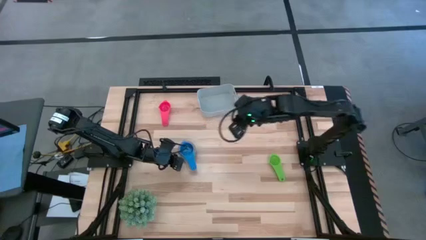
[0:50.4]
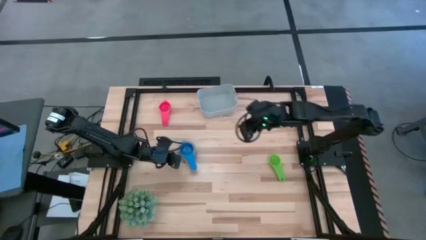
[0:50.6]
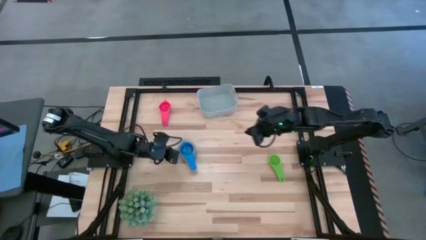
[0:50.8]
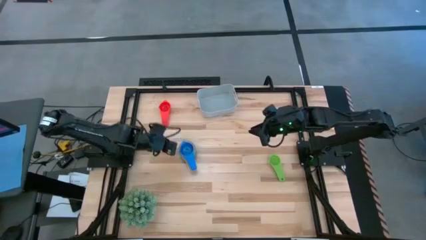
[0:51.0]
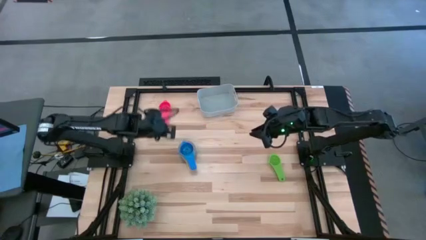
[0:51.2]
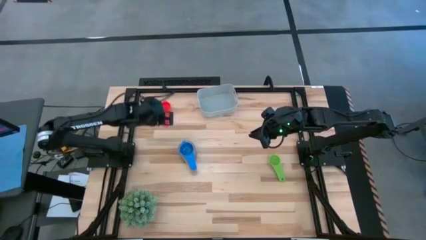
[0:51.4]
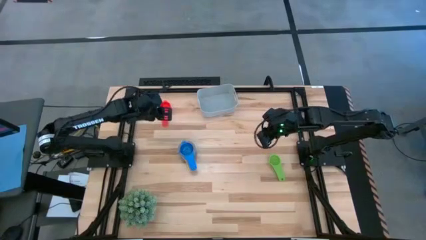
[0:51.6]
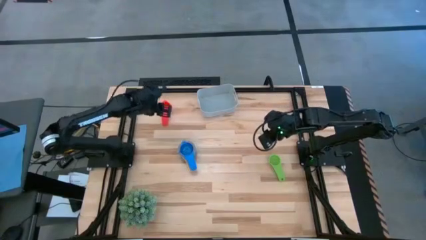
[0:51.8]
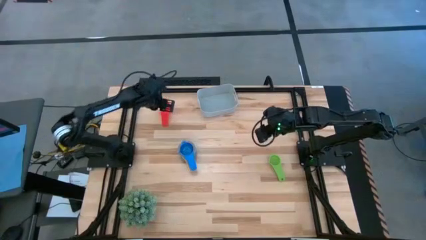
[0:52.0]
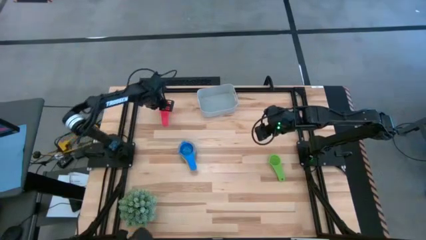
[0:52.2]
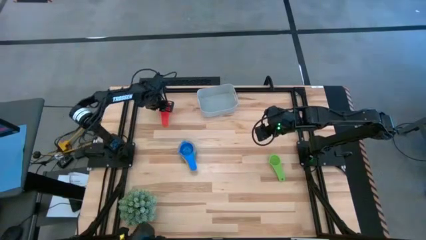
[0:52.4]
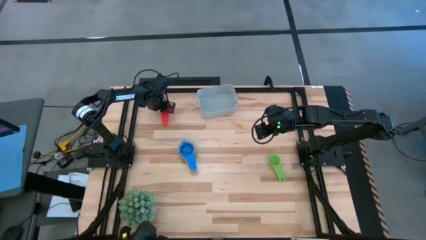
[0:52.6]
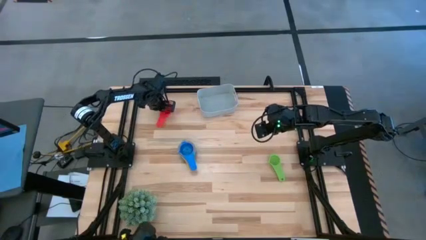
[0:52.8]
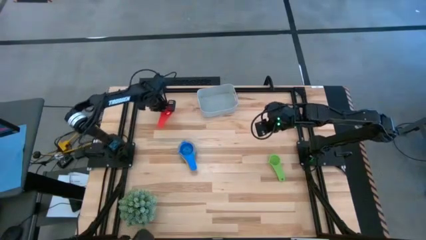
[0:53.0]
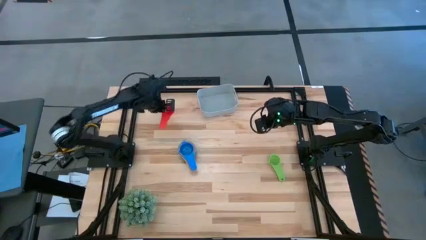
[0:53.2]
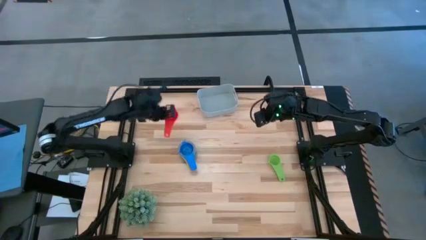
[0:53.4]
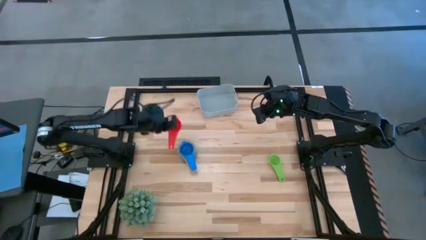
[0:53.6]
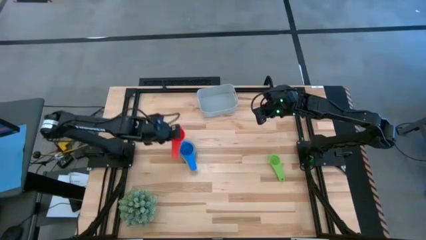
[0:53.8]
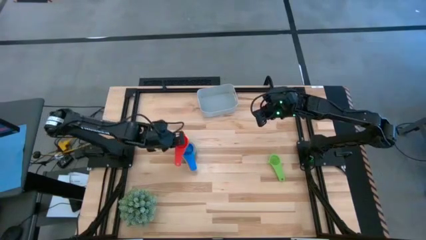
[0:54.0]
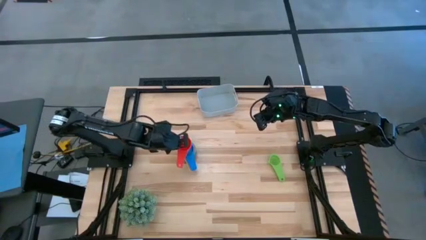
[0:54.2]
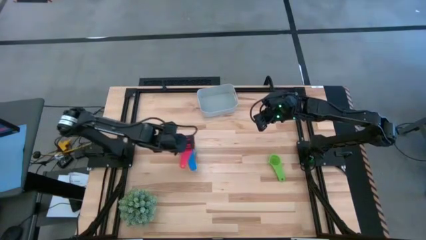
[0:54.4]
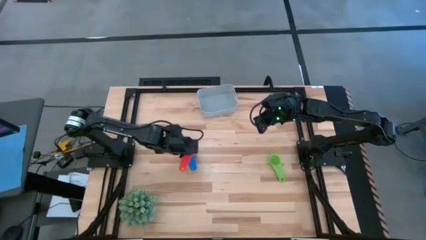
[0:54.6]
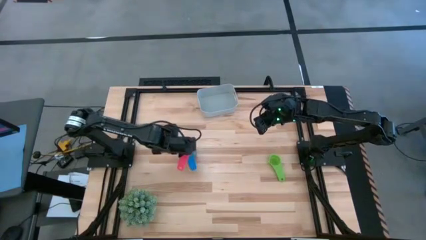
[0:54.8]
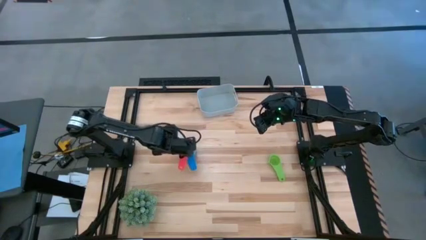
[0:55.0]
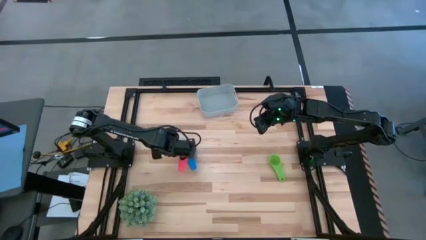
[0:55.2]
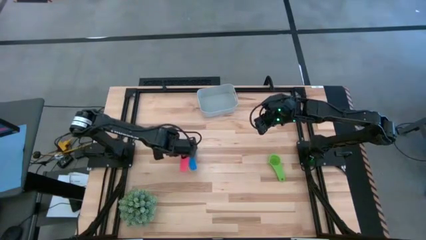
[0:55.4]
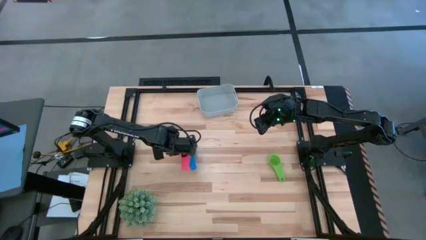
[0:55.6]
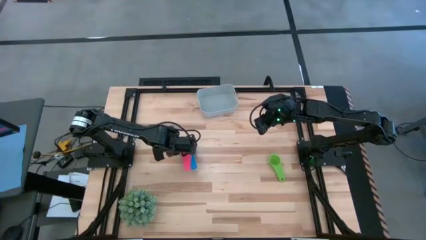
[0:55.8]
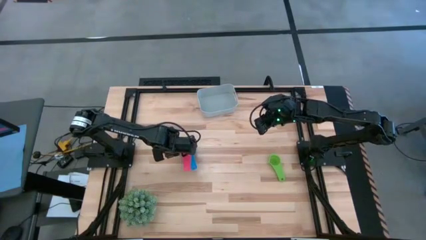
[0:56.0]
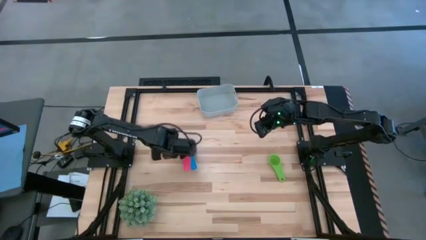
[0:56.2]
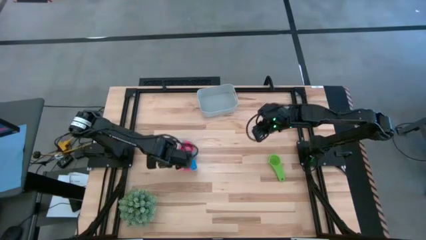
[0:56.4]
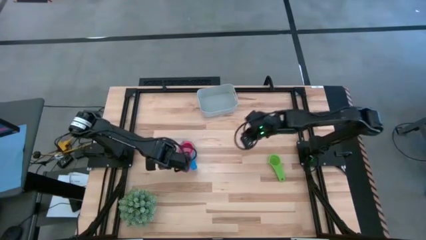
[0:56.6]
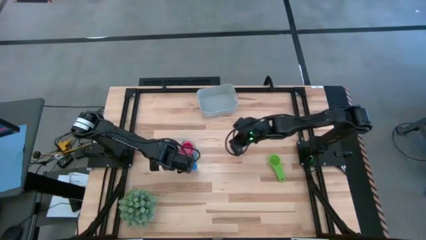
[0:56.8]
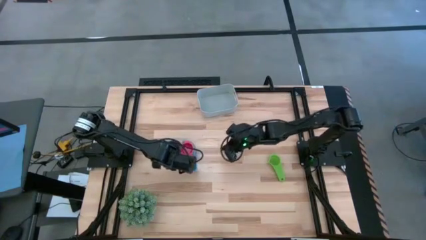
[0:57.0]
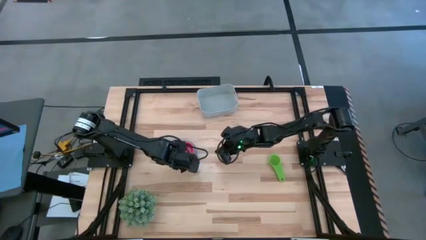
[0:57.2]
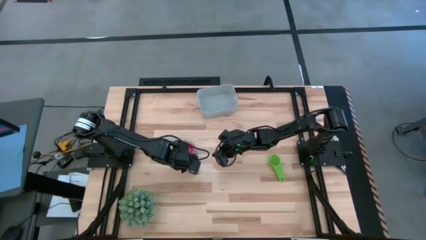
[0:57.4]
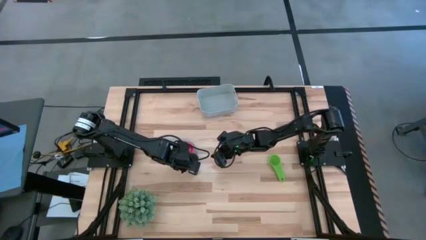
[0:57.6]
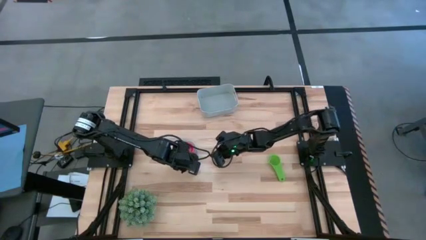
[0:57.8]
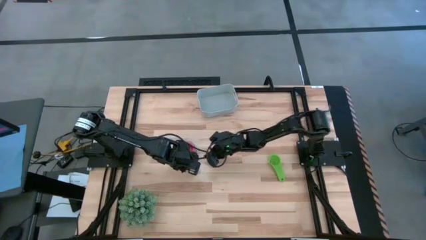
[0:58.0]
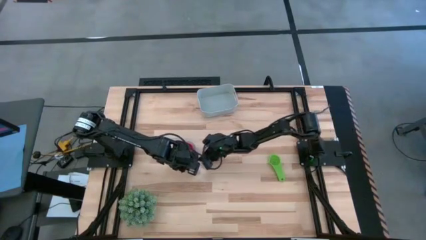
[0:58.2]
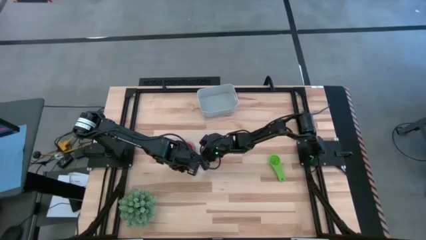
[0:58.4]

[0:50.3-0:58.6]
Task: Nest measuring cups in basket
Stack the pink measuring cup on the blue measuring cup

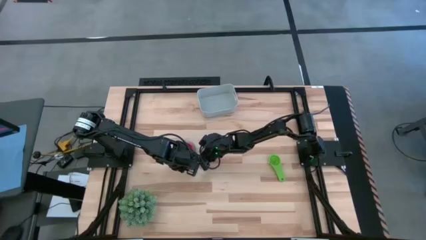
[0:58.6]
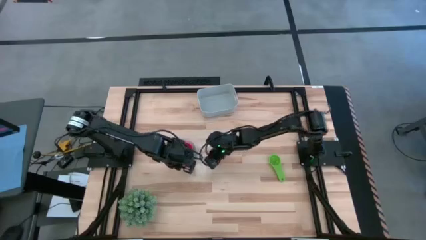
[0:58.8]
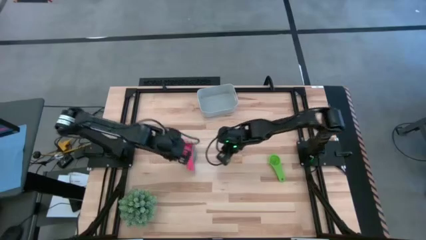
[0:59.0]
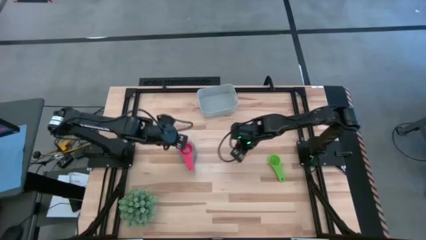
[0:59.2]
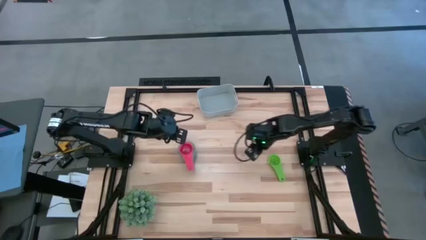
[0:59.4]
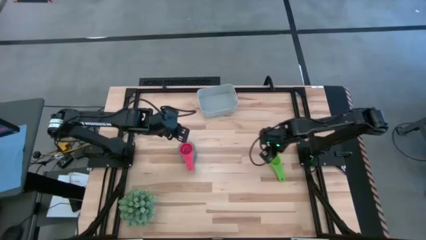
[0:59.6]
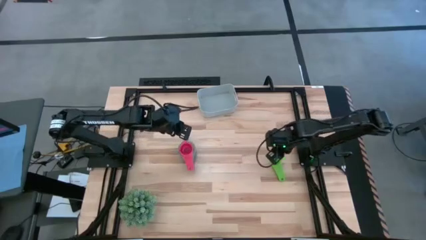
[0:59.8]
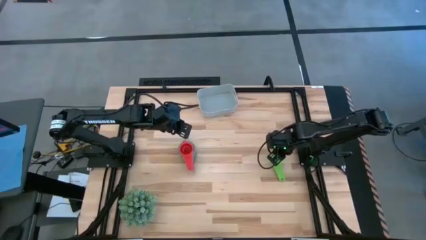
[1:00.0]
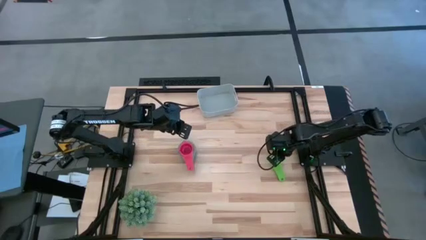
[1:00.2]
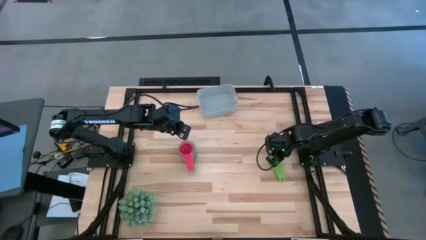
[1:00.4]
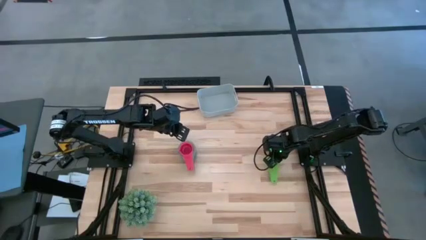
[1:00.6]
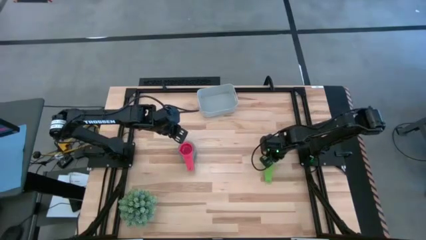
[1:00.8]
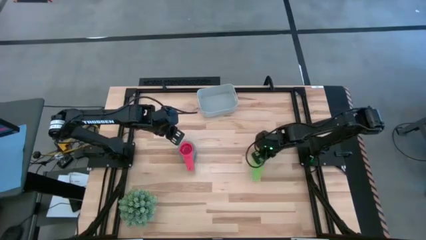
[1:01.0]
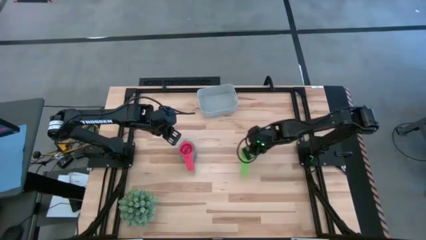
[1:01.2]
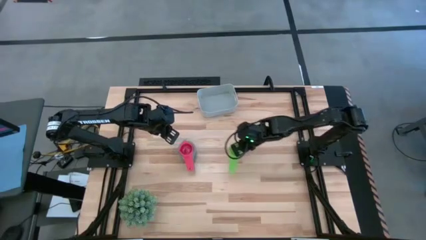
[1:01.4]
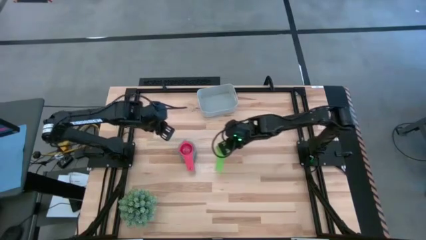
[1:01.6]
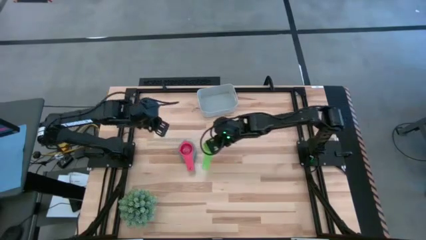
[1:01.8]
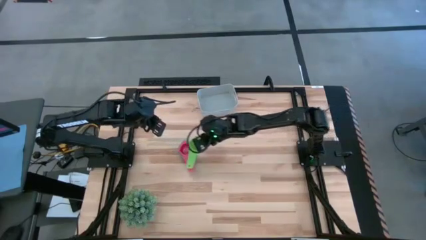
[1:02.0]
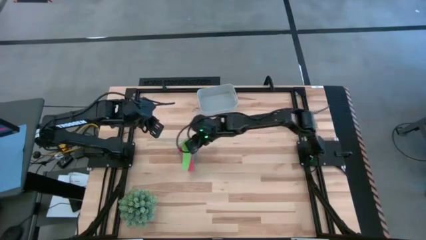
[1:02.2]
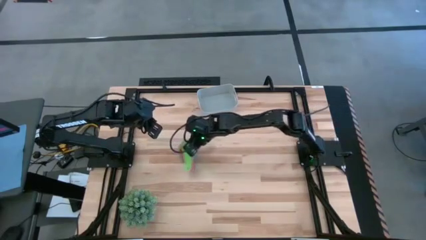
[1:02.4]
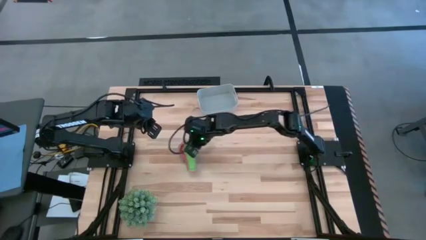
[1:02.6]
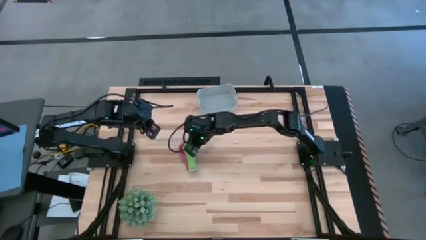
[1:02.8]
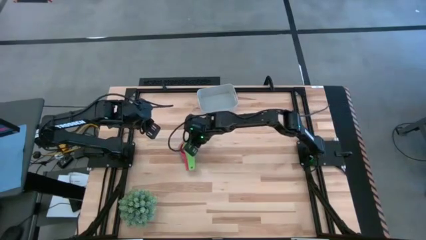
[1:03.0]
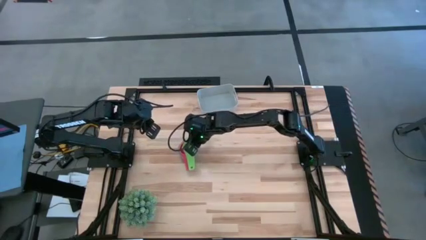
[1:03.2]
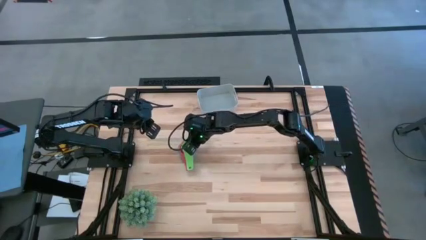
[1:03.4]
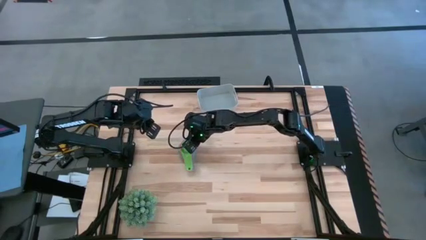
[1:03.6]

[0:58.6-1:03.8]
Stack the green measuring cup on the pink measuring cup

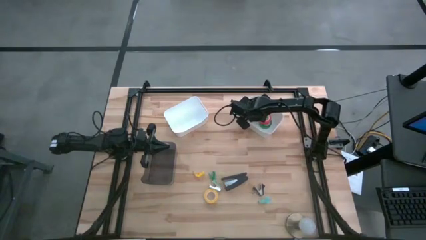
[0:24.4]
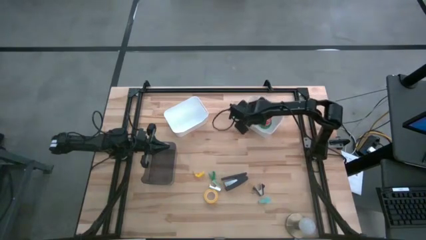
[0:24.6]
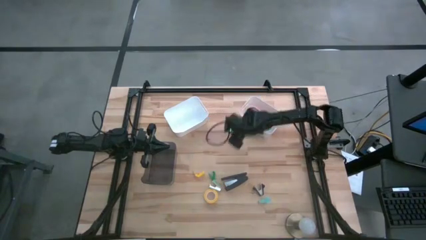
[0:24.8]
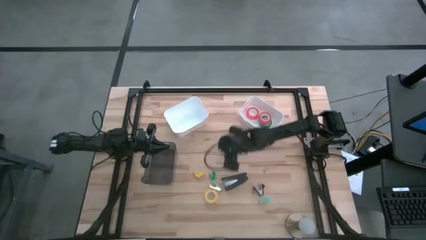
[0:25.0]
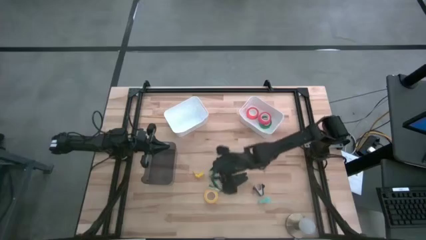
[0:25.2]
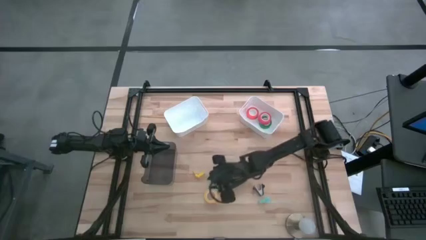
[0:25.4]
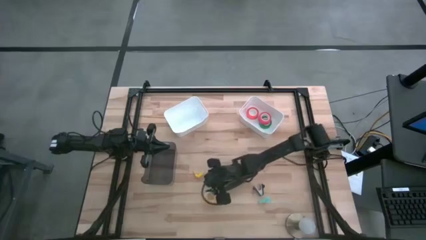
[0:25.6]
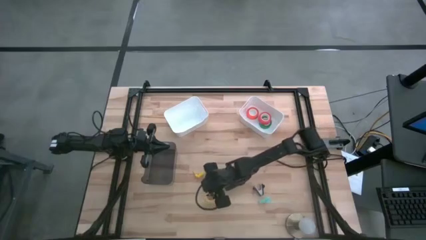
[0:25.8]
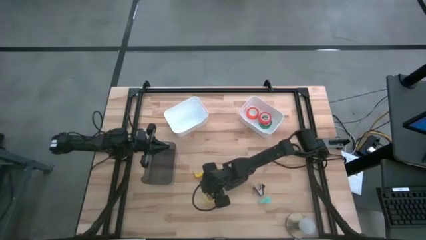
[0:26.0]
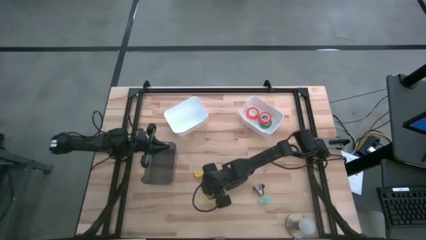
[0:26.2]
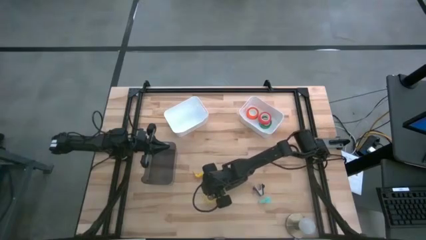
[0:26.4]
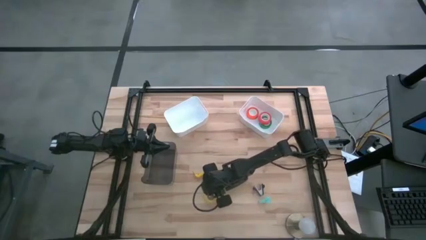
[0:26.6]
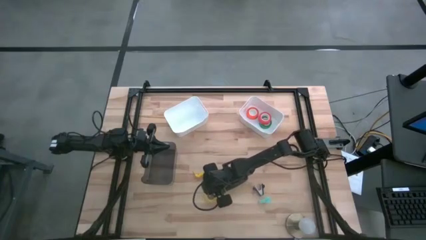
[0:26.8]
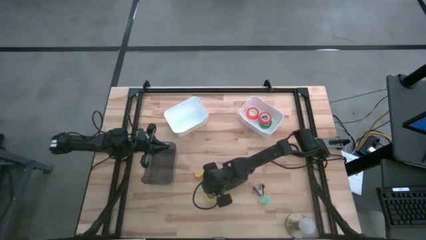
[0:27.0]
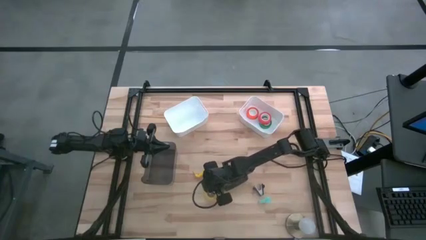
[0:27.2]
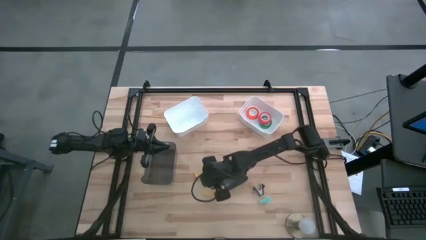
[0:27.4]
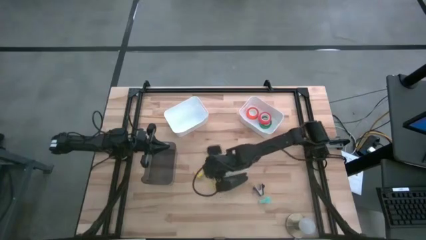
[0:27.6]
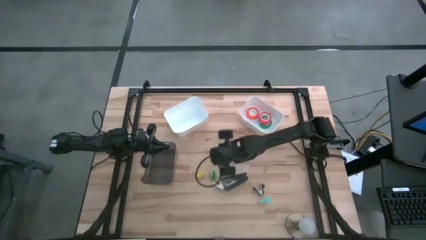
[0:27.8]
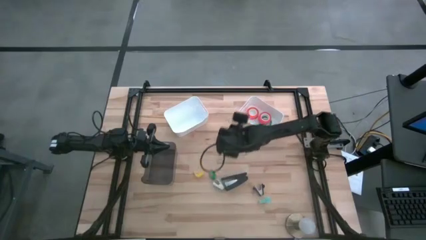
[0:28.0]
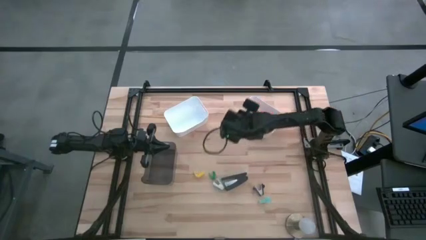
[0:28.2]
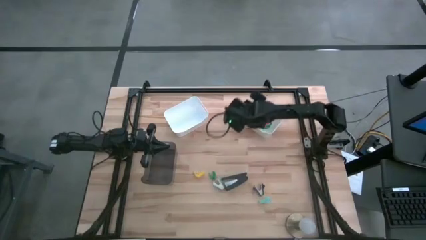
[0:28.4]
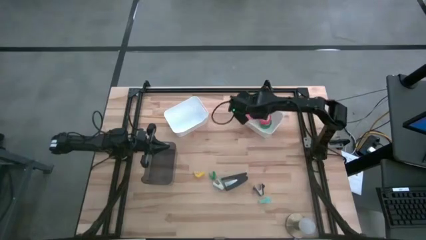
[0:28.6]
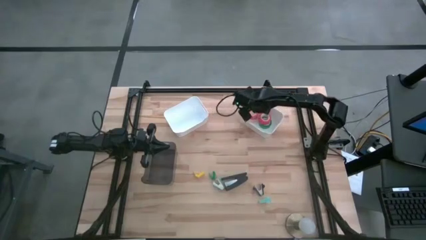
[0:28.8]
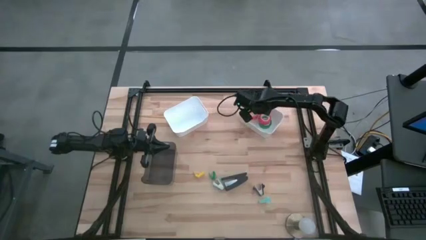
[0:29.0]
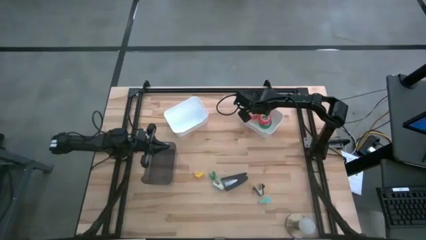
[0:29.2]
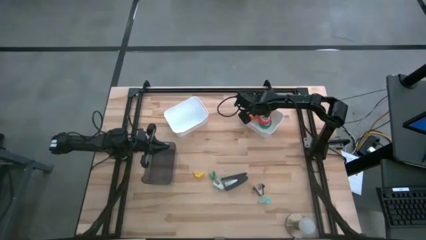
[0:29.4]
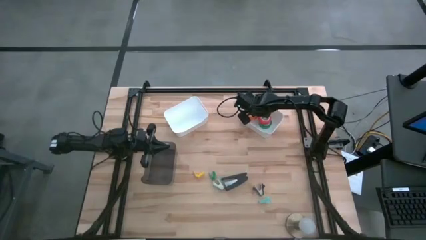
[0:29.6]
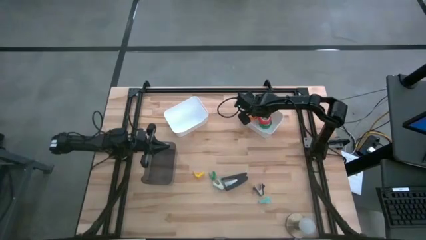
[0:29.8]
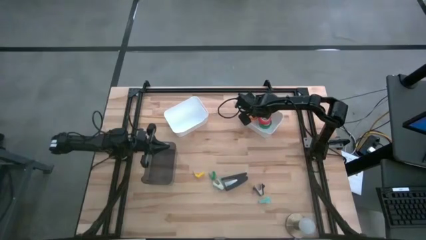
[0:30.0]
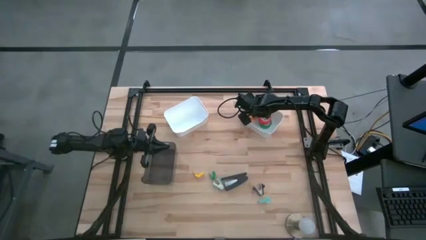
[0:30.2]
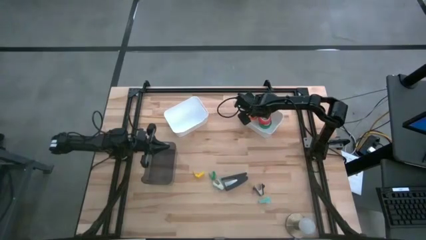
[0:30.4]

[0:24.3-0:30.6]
Task: Pick and place Stapler, Stapler remover, tape
Put the yellow tape into the right white bin
